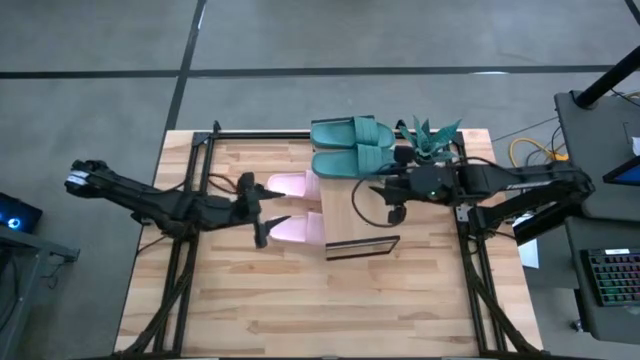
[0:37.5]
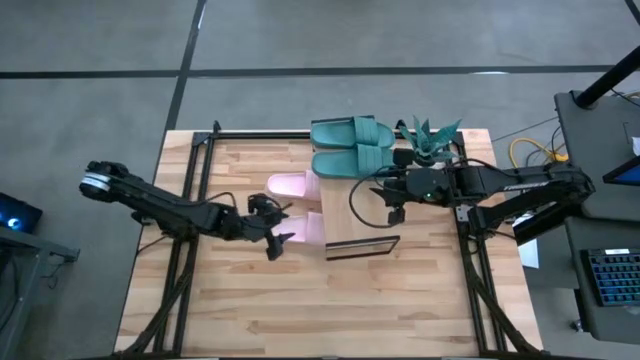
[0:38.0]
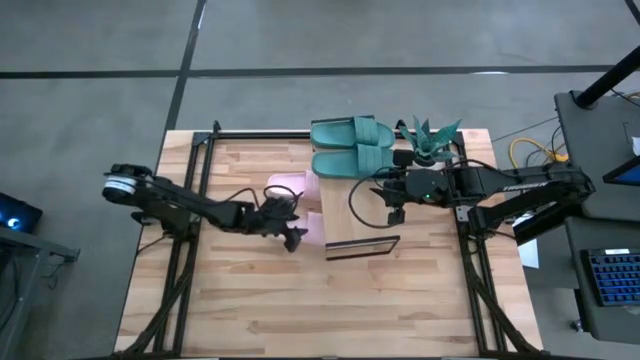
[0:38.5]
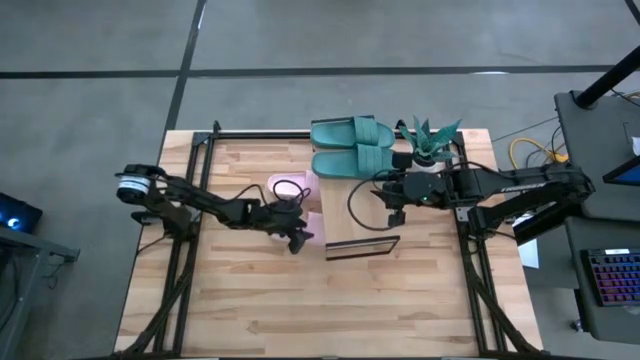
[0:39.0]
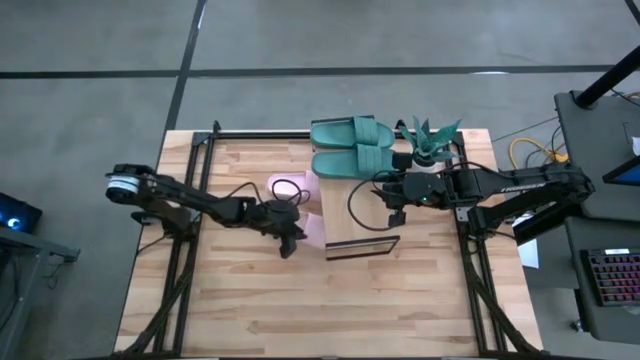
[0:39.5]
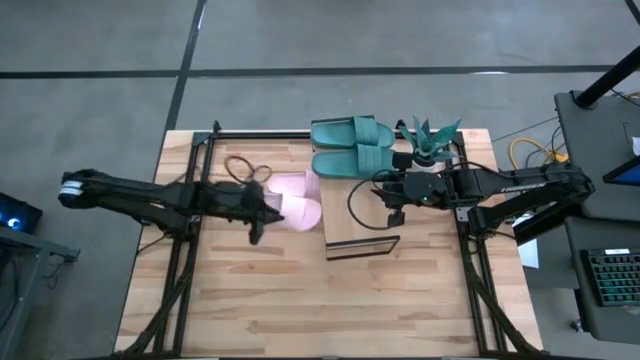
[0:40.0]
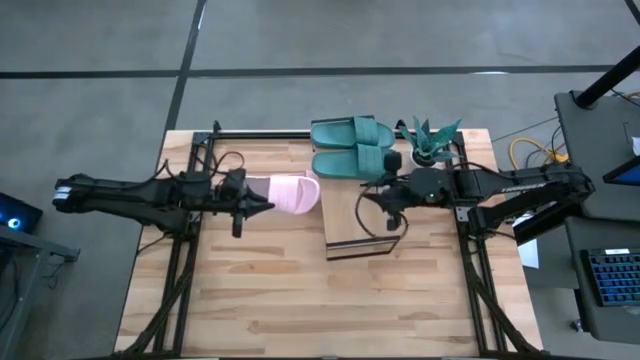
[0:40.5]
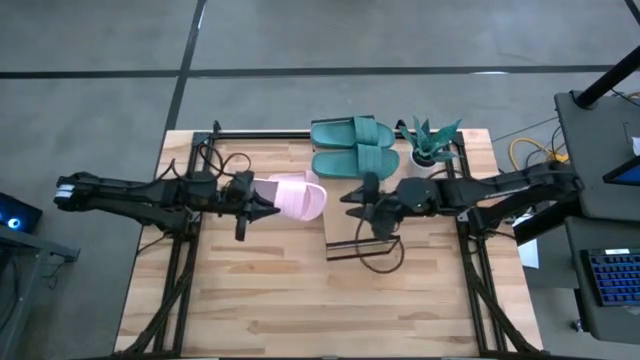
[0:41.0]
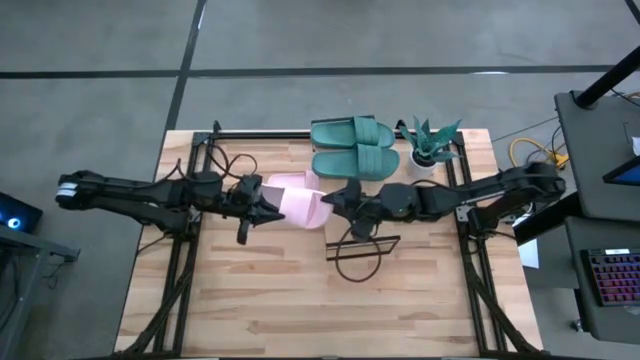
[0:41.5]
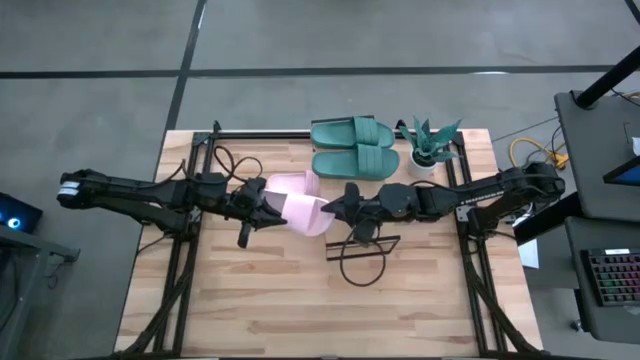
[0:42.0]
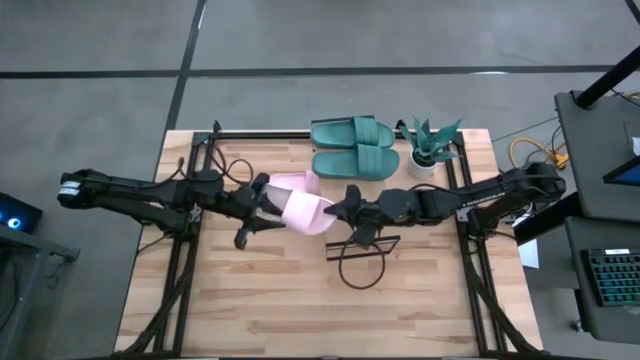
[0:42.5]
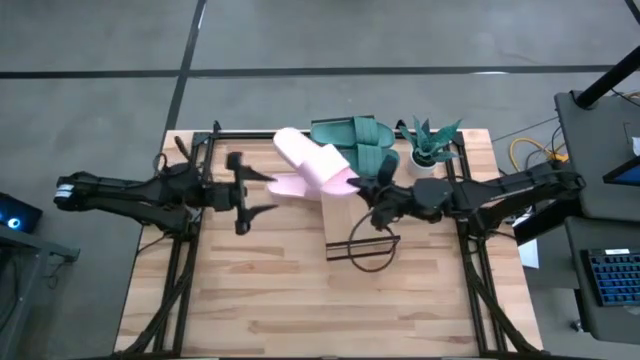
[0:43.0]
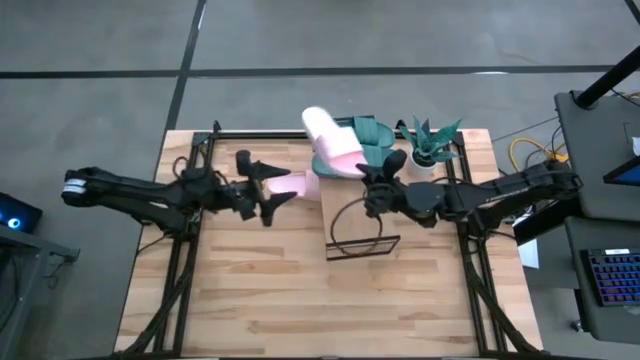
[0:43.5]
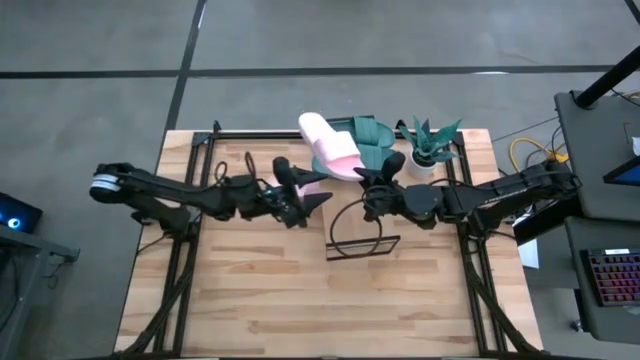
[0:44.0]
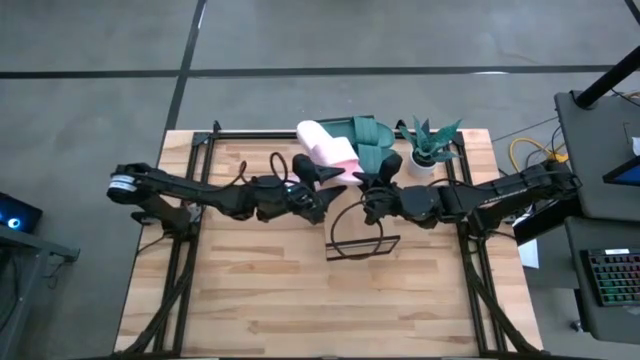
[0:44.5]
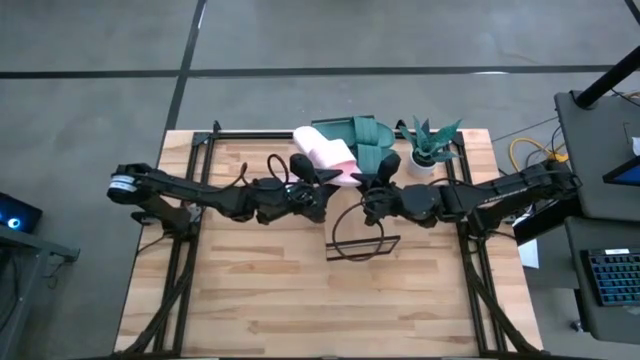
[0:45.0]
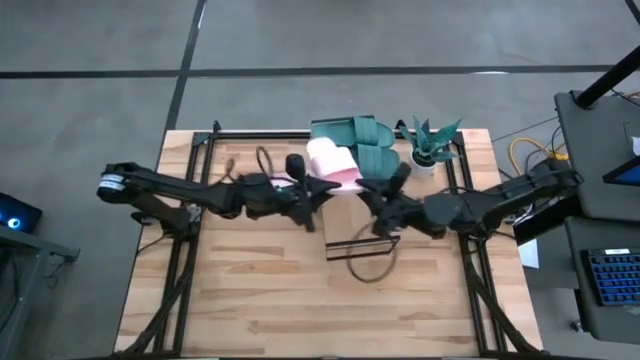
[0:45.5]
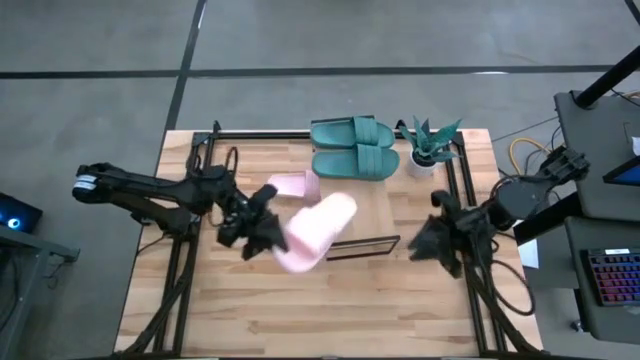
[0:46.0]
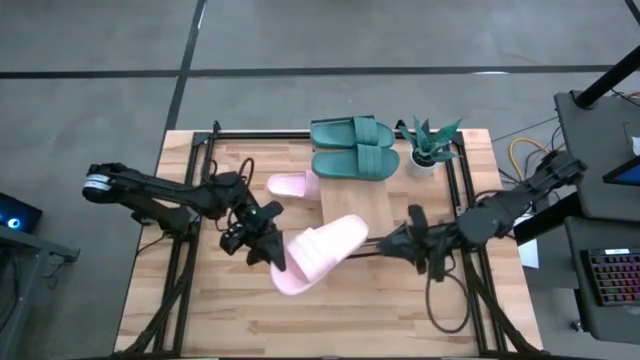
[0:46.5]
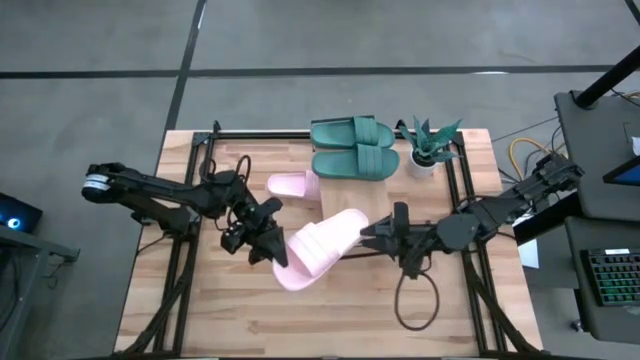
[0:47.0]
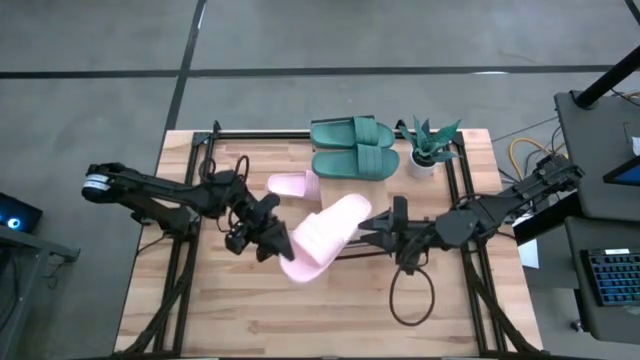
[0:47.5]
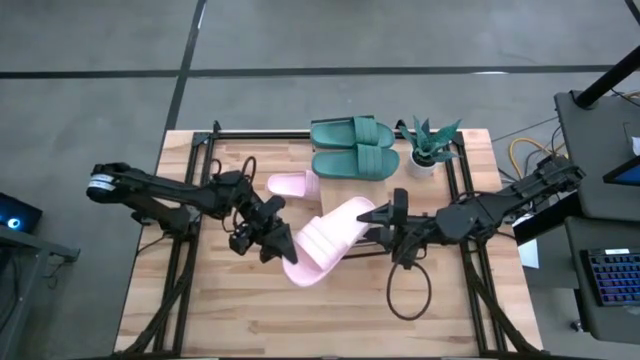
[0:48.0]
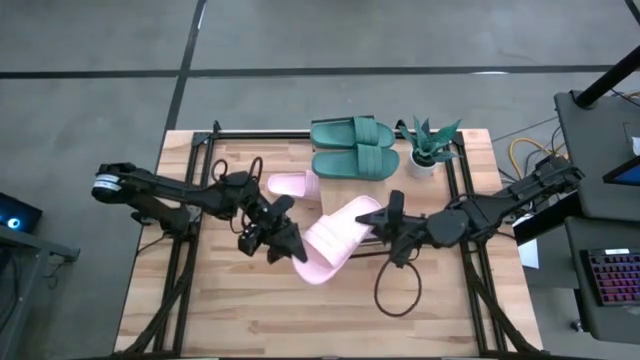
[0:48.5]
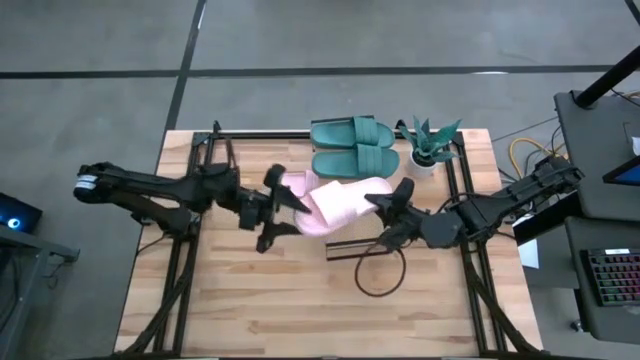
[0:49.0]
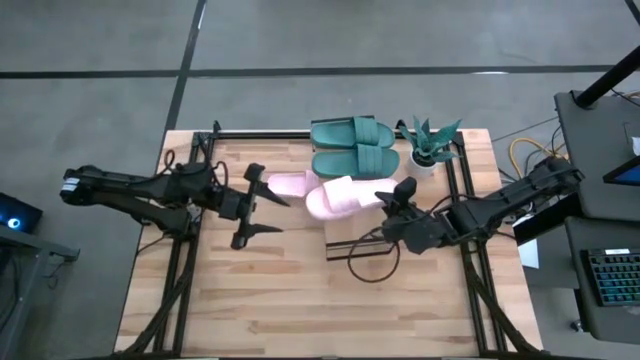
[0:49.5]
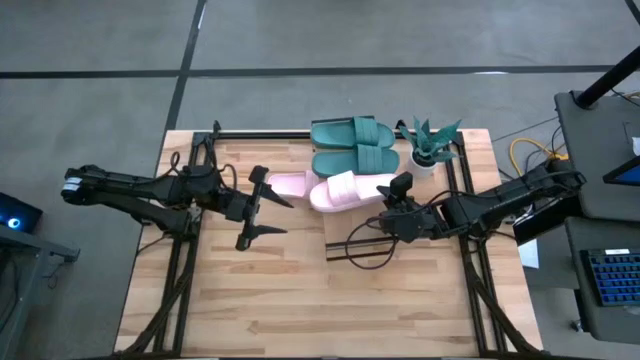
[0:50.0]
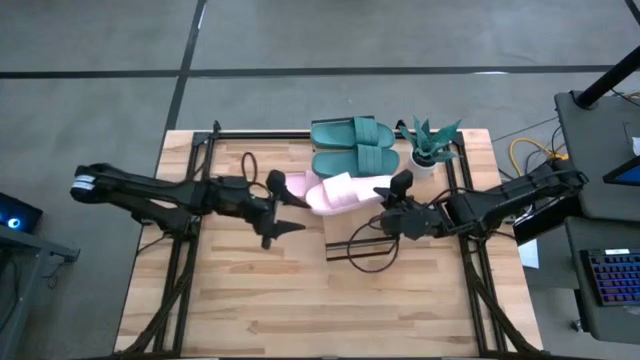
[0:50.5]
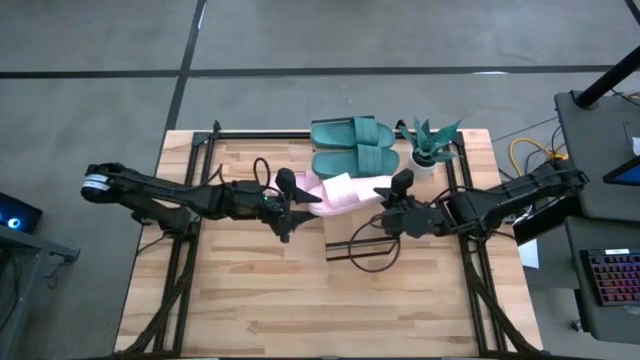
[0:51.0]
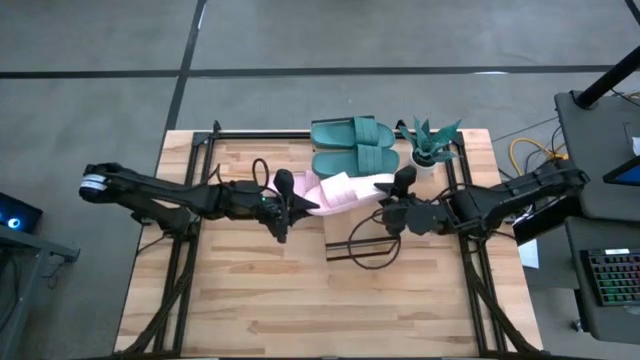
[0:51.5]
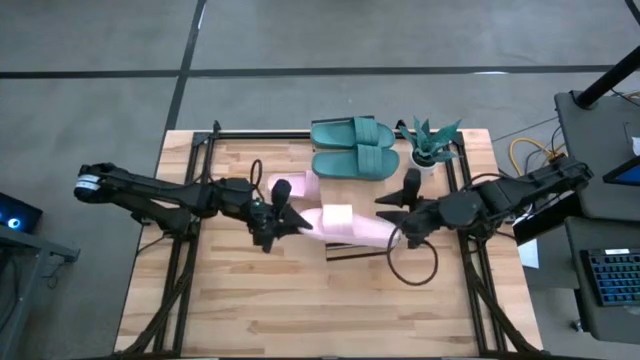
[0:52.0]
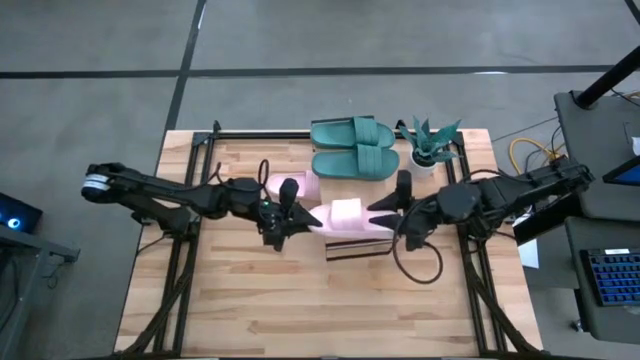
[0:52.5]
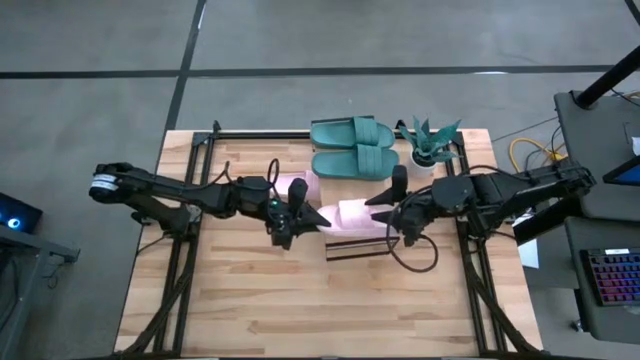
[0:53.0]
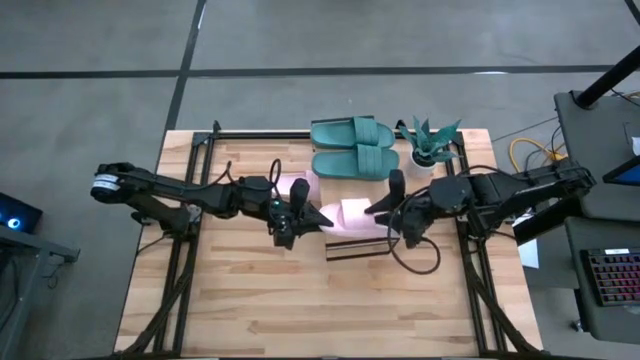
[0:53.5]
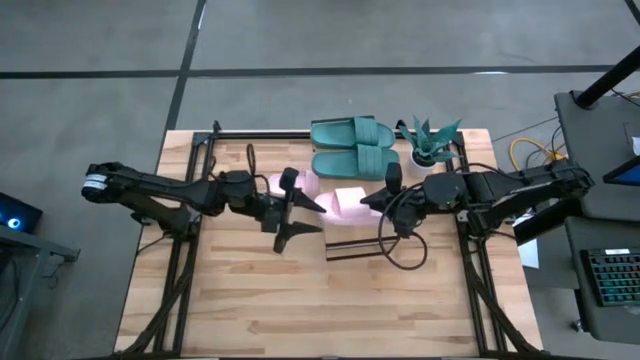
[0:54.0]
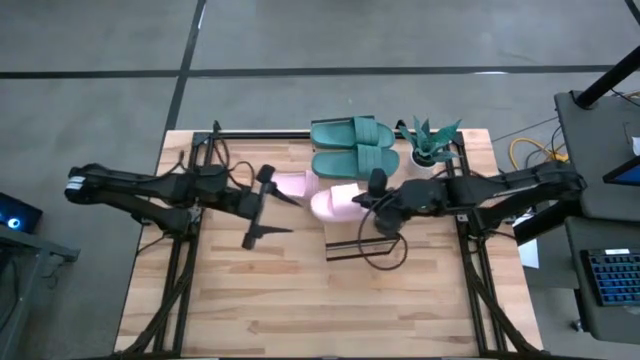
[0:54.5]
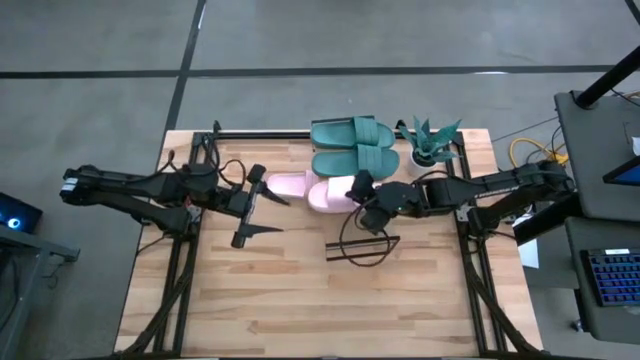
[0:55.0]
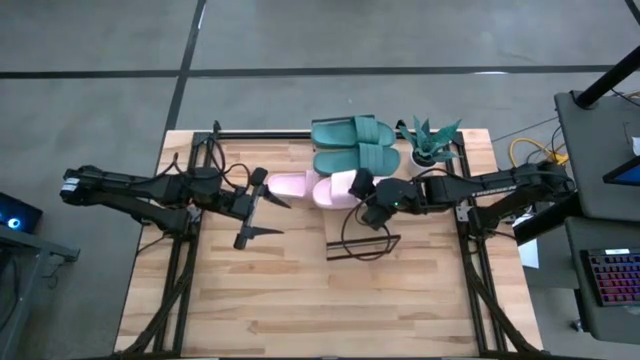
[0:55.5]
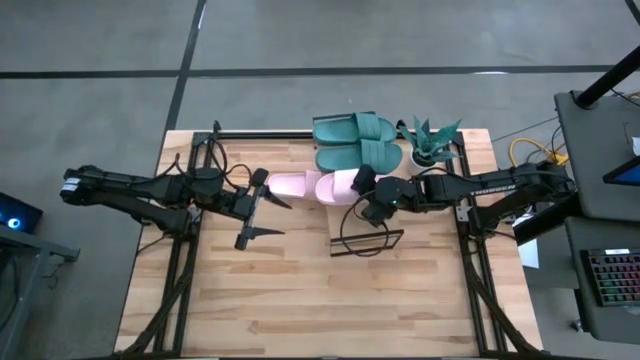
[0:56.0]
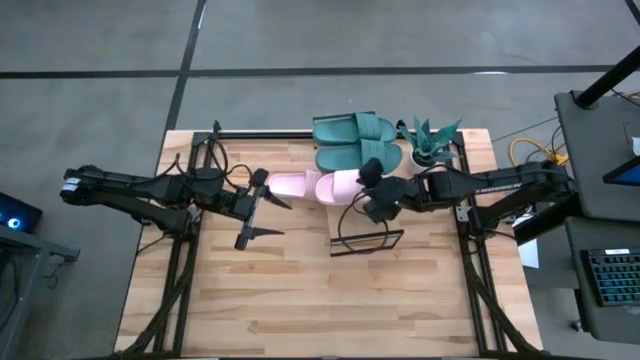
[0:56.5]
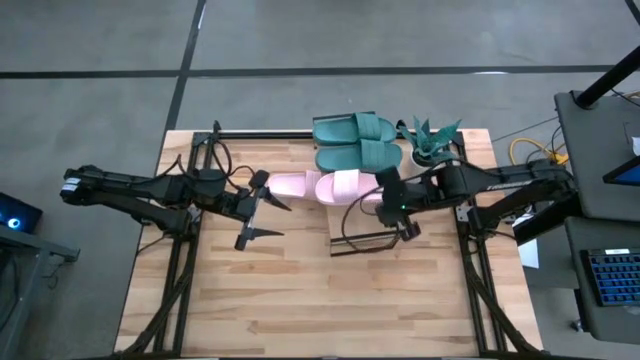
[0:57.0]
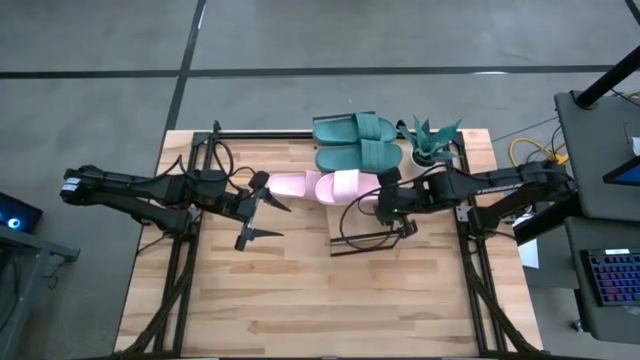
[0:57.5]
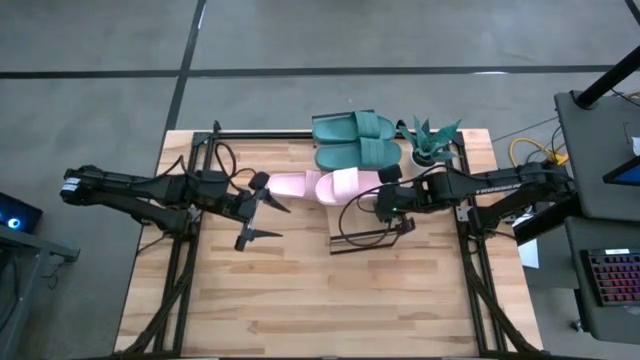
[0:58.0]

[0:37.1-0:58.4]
Task: Pick and place slides into the shelf
Put the bottom pink slide on the shelf
